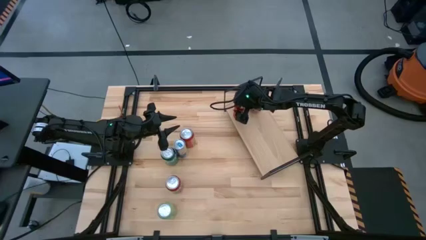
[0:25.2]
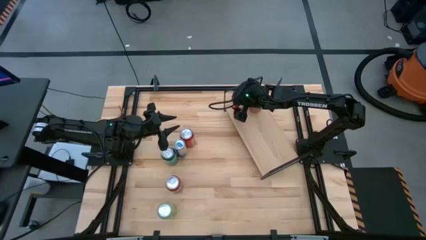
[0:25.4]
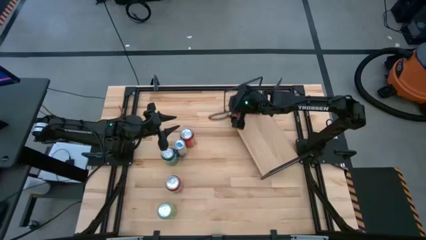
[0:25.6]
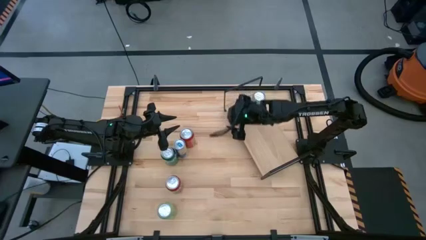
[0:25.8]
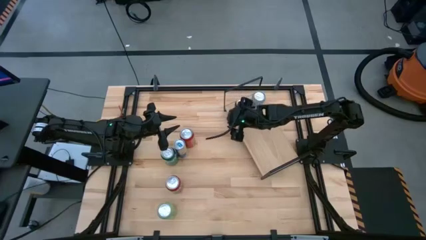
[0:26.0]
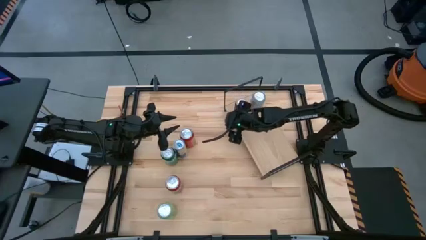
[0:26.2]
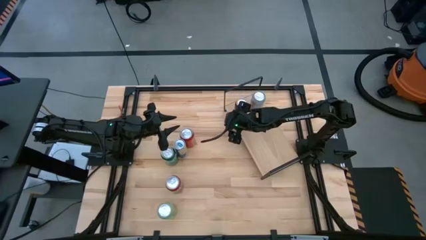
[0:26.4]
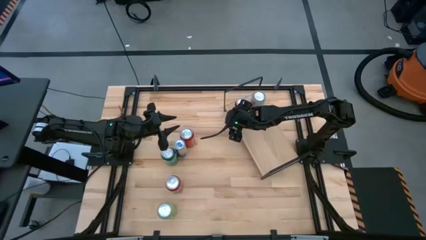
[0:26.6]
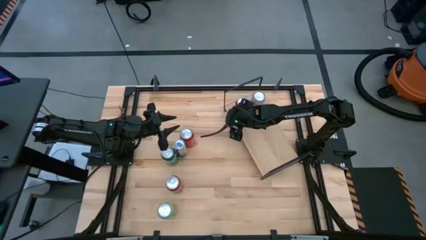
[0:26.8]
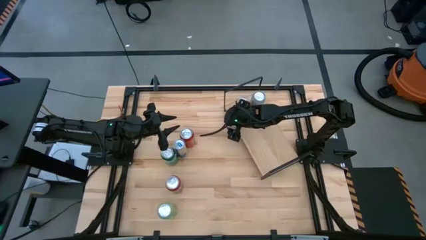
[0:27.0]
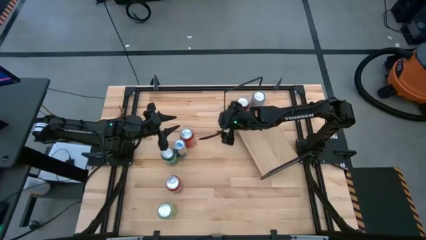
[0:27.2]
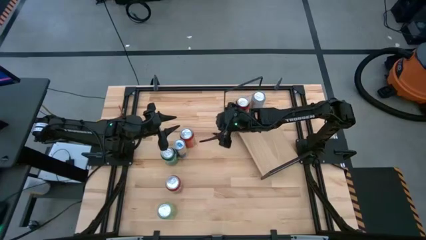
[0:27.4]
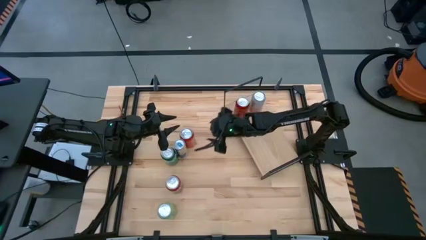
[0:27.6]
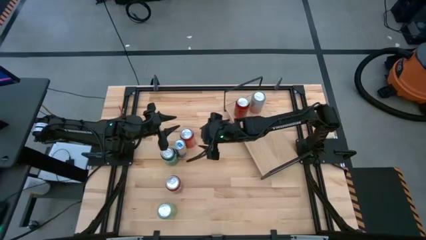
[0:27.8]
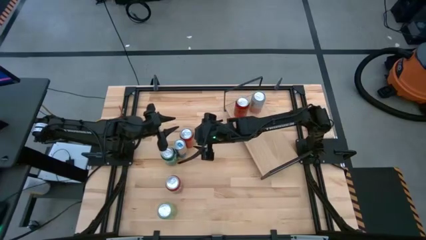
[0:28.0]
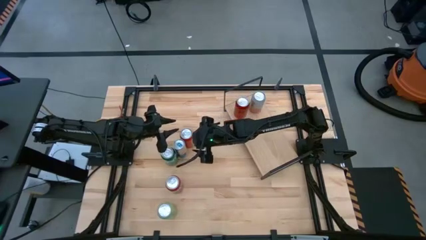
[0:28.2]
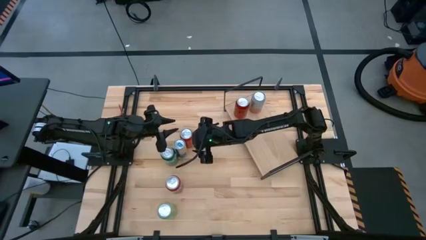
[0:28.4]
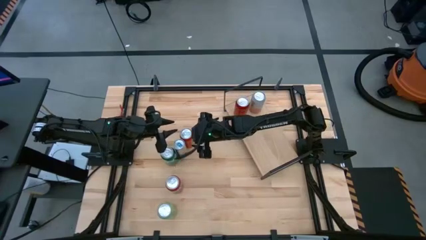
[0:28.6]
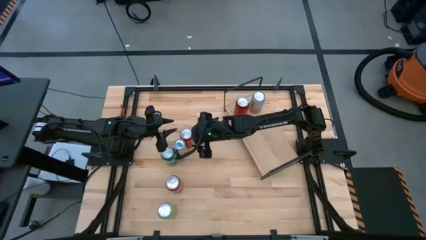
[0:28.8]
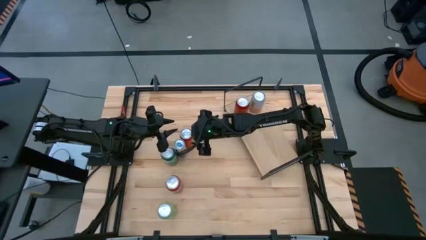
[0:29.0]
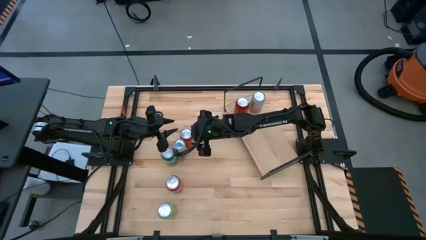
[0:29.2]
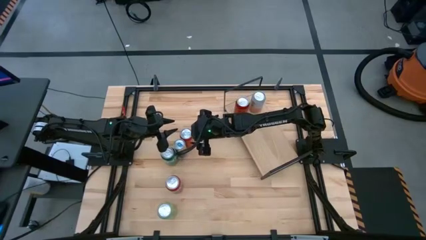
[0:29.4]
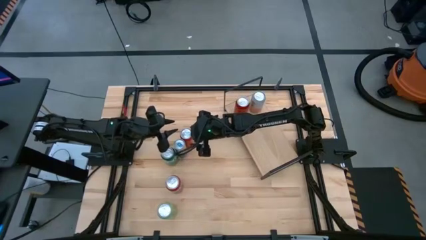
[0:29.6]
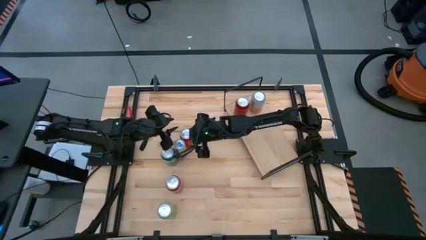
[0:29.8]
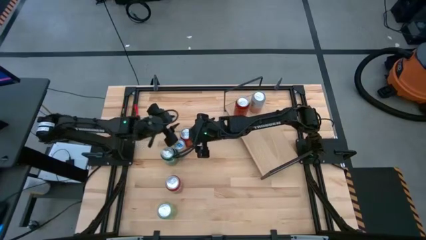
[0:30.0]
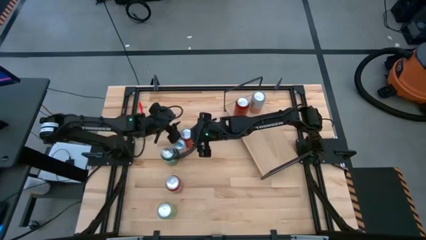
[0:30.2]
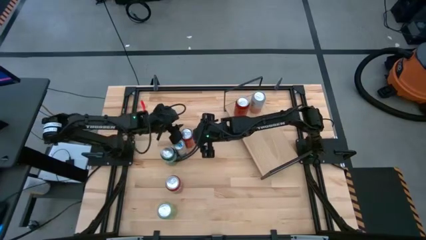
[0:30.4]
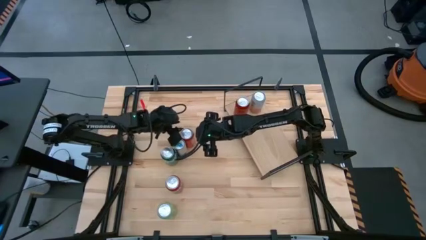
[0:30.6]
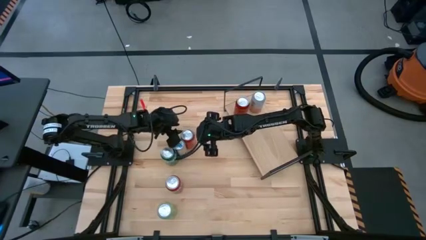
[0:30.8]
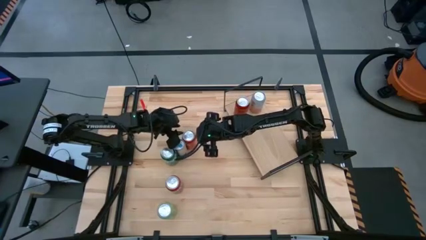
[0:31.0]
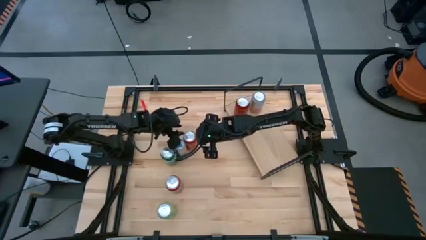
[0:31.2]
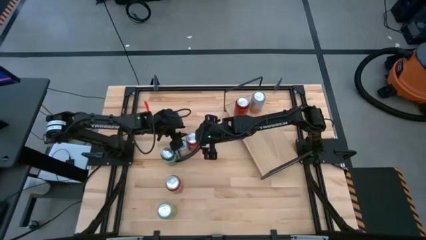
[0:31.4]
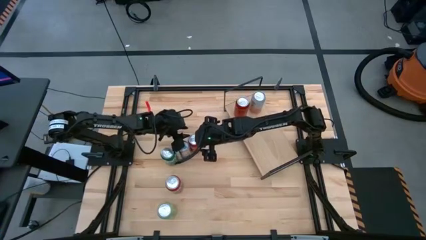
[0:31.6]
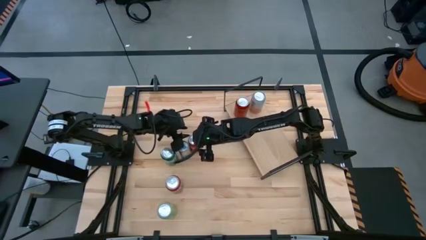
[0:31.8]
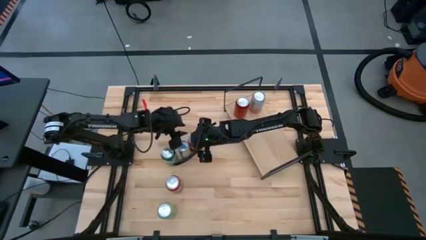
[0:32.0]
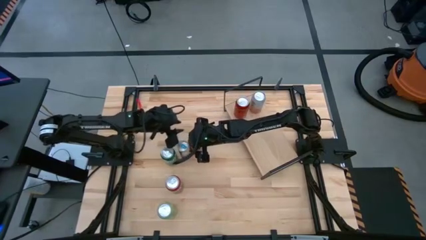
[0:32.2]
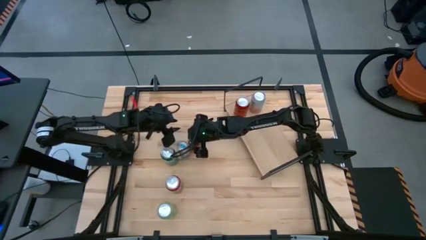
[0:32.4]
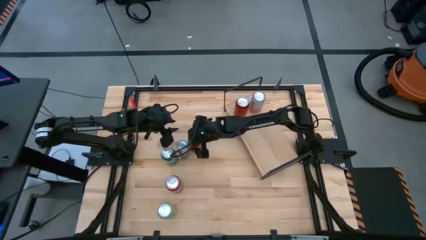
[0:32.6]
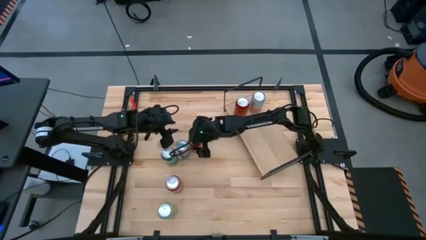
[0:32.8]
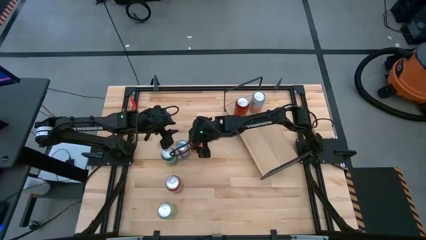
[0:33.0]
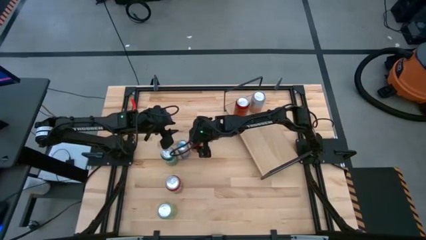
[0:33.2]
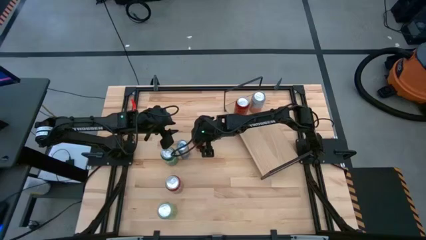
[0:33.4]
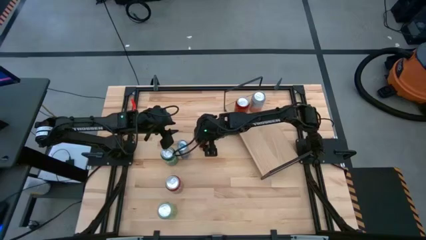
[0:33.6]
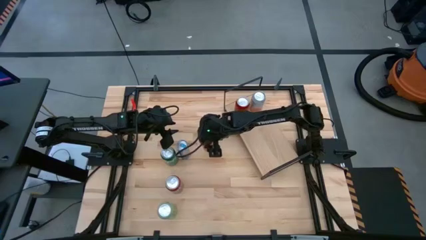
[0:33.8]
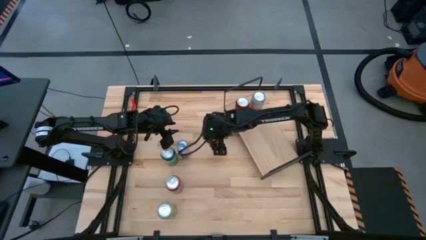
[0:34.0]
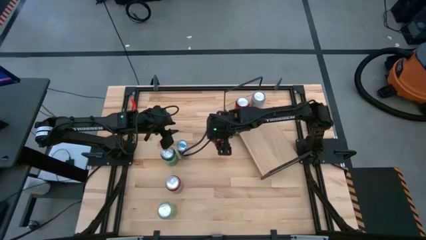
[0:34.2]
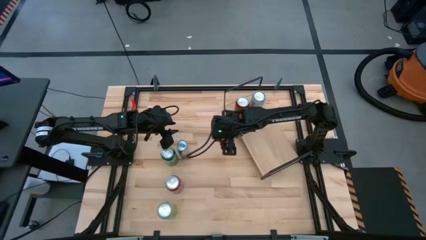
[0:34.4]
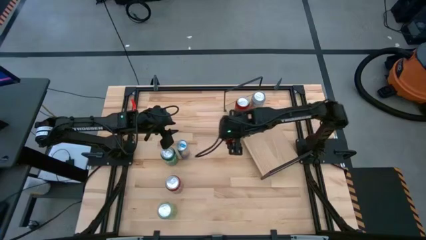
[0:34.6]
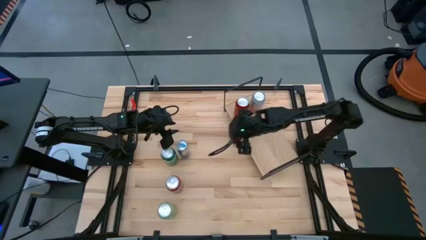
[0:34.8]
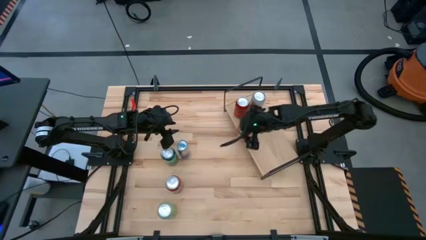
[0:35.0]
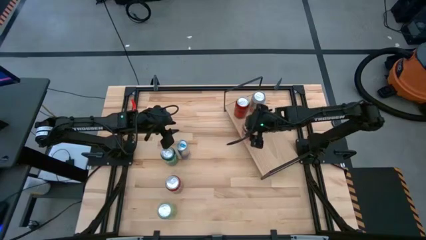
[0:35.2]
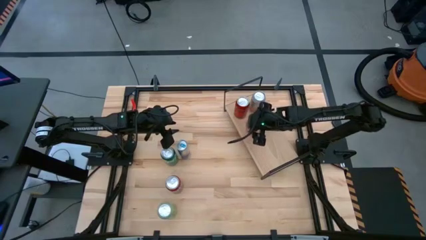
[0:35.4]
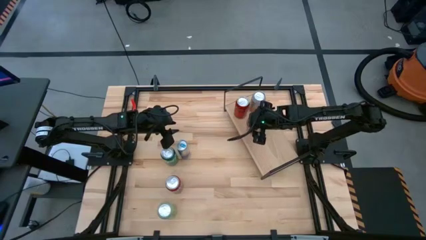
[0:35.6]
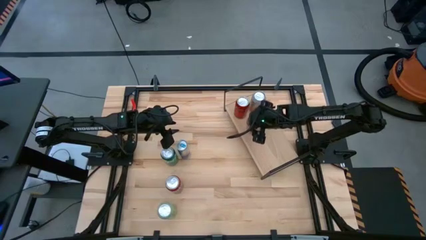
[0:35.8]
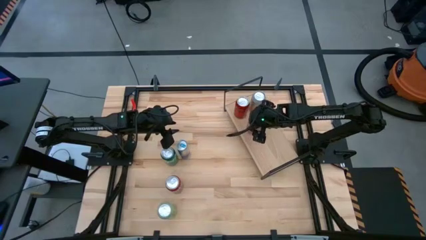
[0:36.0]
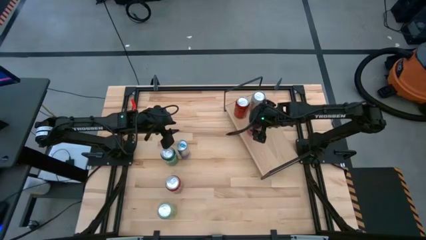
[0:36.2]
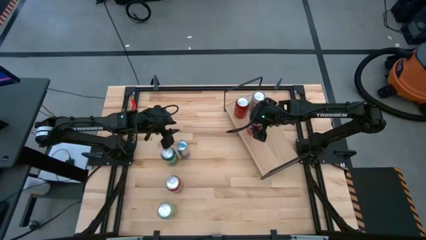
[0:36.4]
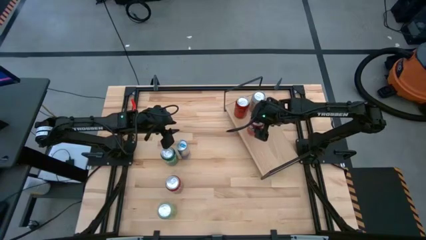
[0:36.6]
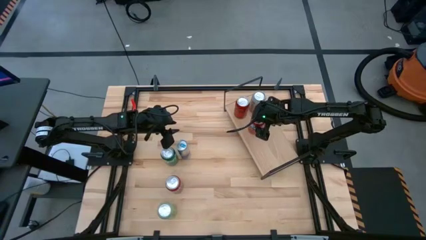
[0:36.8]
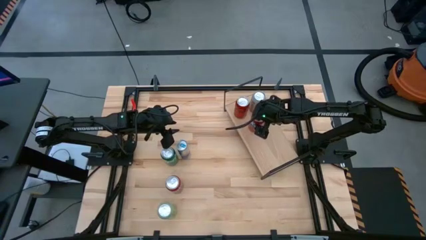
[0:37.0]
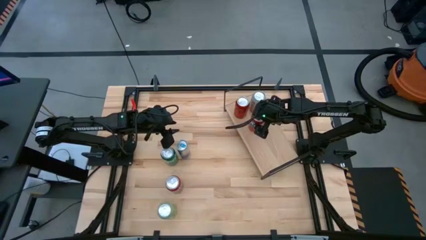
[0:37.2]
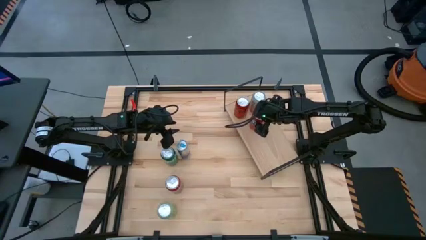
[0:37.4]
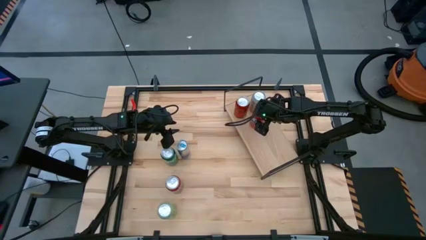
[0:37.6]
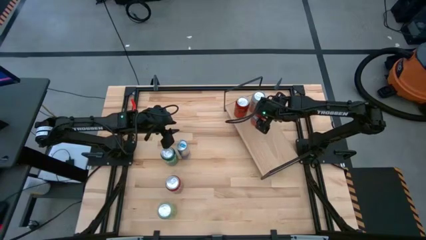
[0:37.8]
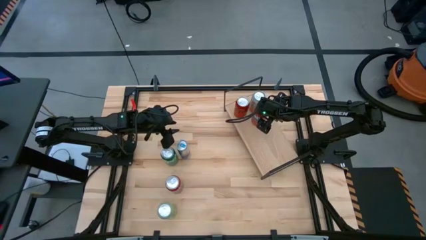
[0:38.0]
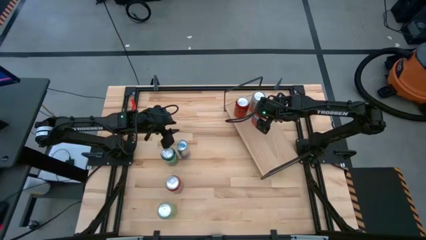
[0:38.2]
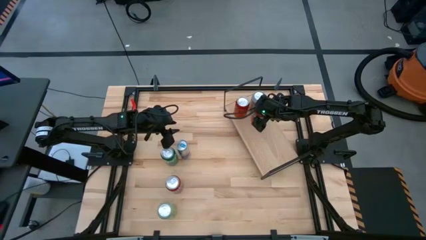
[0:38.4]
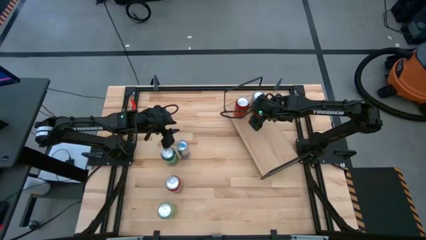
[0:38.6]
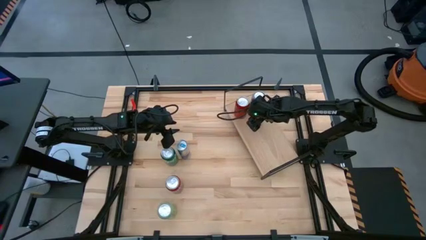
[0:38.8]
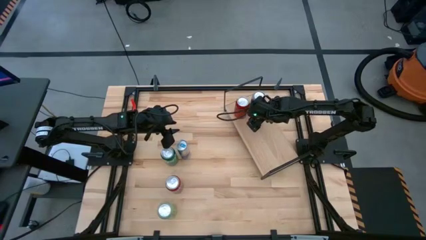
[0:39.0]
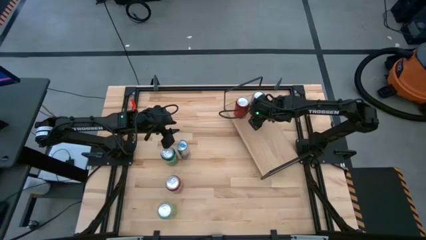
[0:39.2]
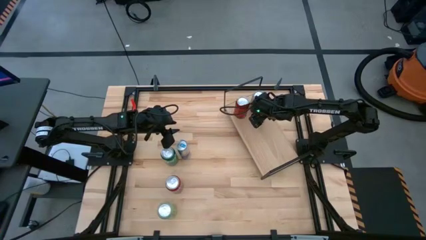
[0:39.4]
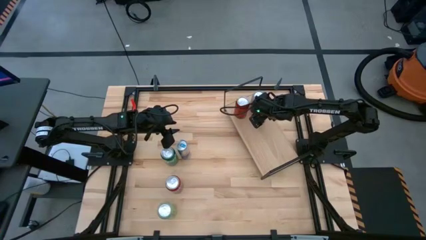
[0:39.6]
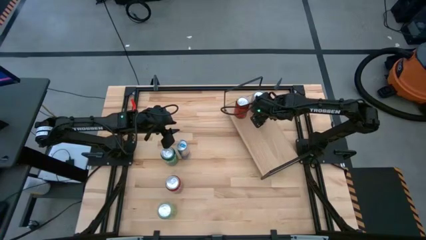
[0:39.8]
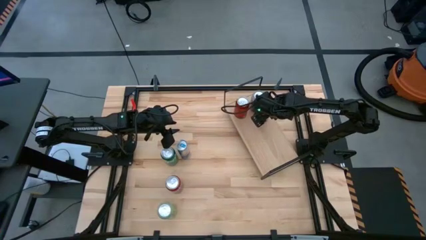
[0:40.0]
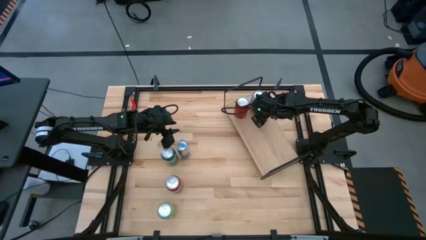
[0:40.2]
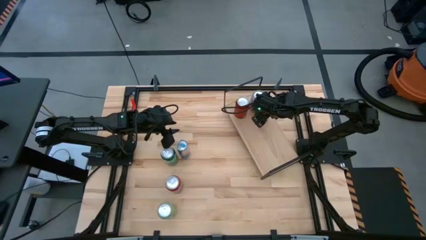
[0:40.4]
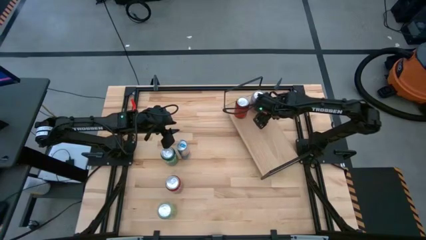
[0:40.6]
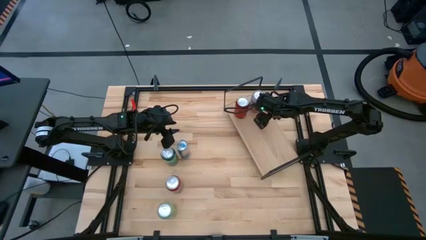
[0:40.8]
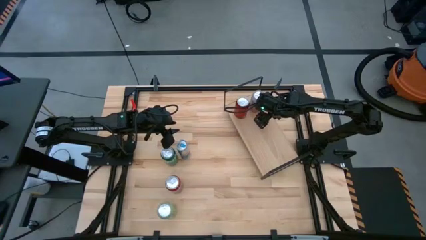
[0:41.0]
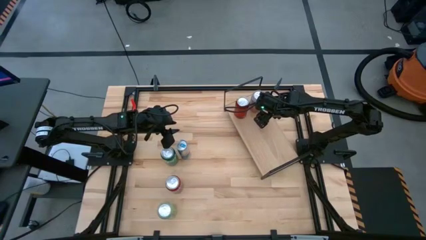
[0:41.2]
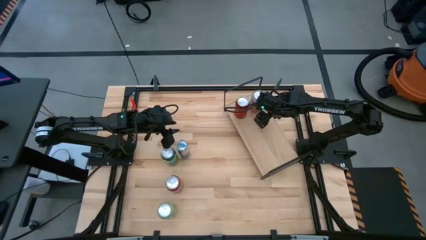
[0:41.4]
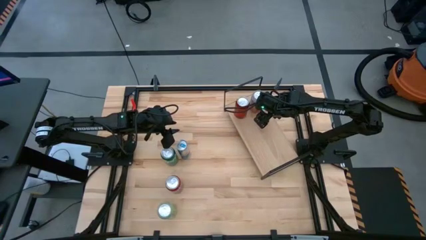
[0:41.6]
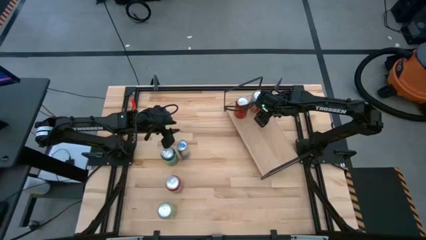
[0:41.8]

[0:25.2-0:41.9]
Task: Place canned beverage on shelf
Put the top orange soda can on the shelf
